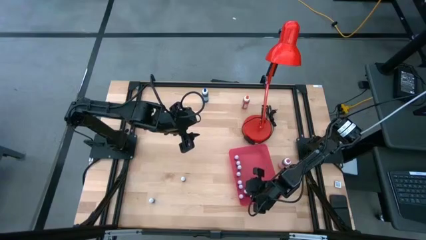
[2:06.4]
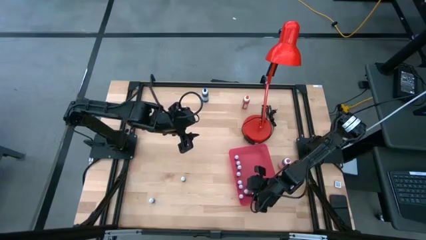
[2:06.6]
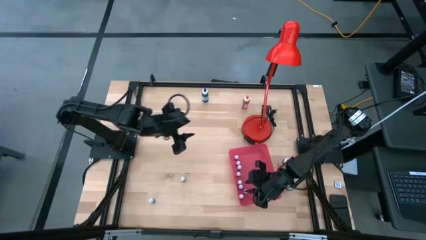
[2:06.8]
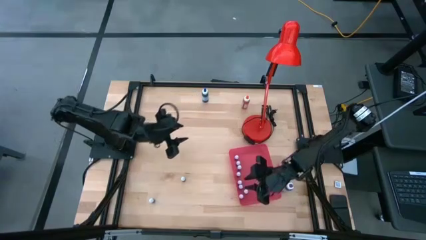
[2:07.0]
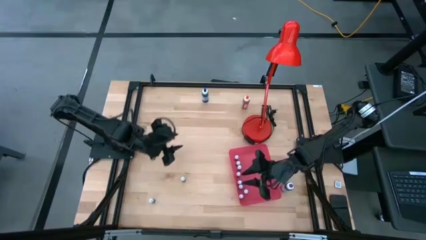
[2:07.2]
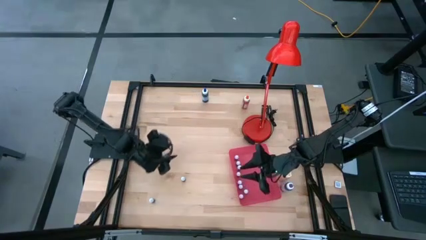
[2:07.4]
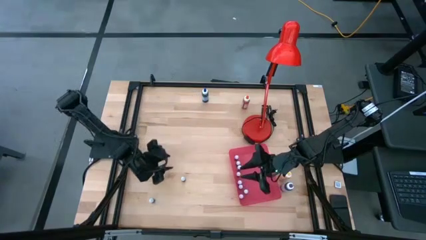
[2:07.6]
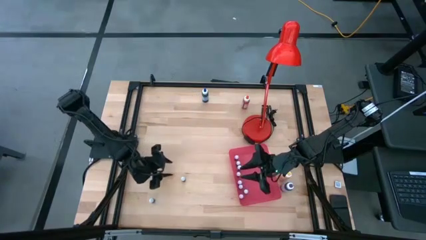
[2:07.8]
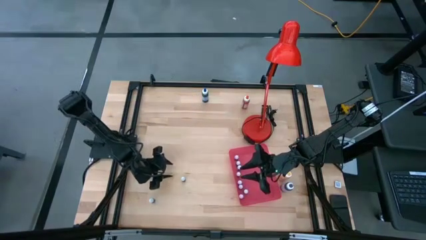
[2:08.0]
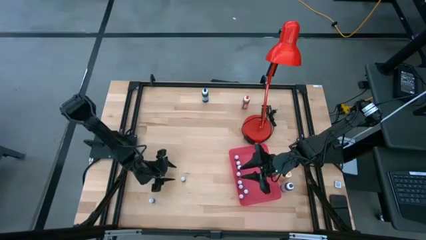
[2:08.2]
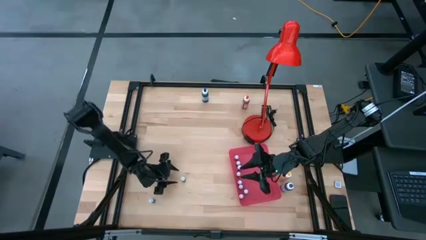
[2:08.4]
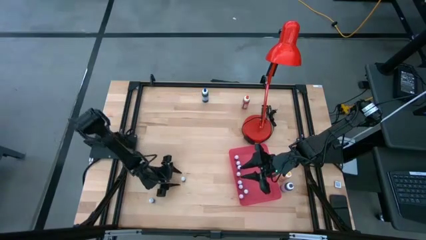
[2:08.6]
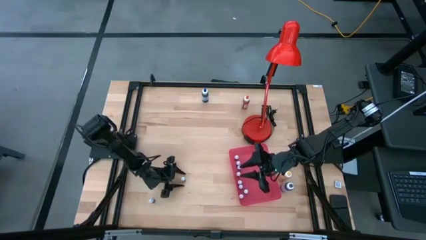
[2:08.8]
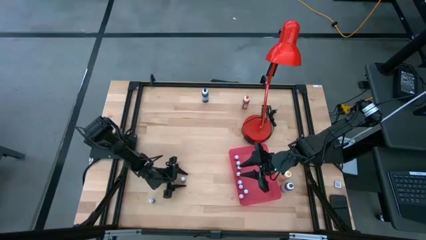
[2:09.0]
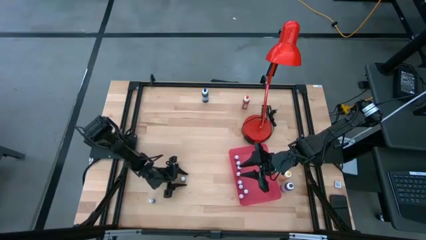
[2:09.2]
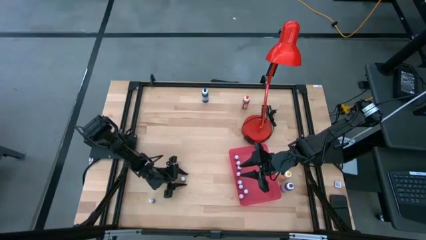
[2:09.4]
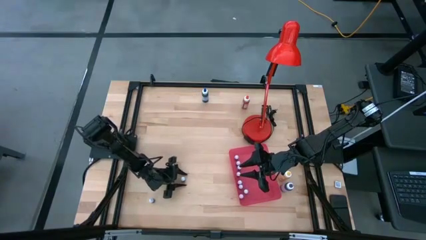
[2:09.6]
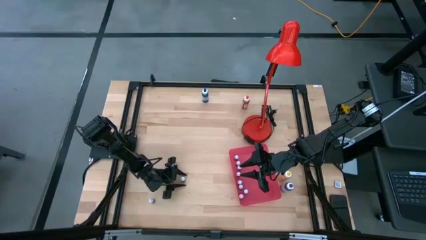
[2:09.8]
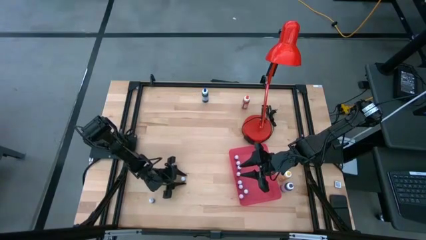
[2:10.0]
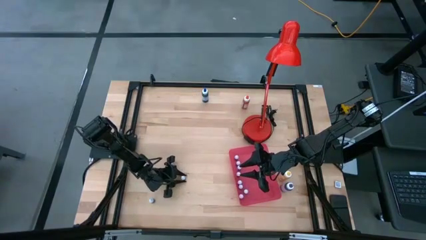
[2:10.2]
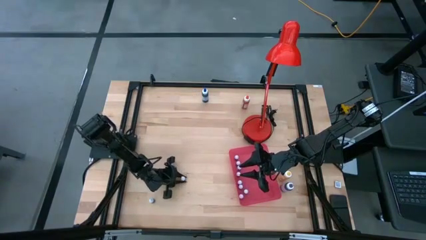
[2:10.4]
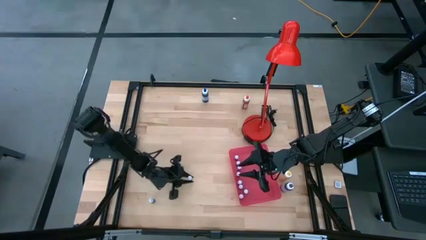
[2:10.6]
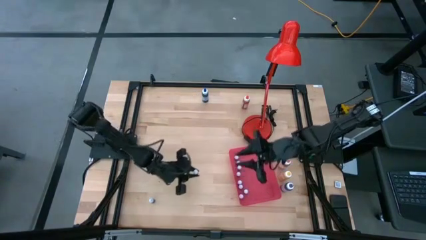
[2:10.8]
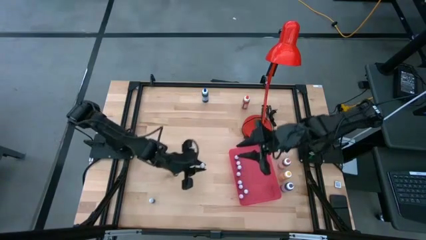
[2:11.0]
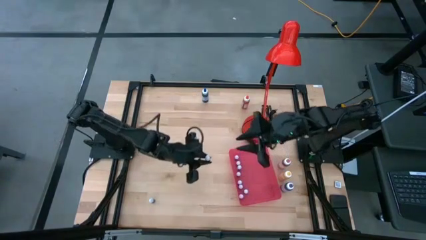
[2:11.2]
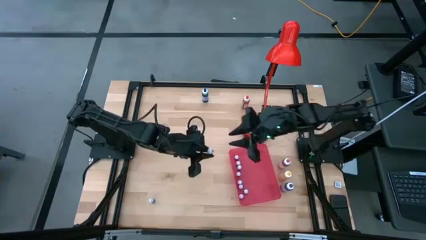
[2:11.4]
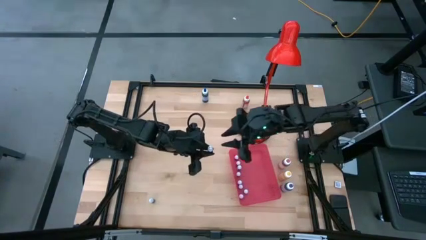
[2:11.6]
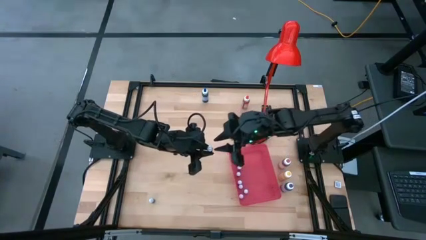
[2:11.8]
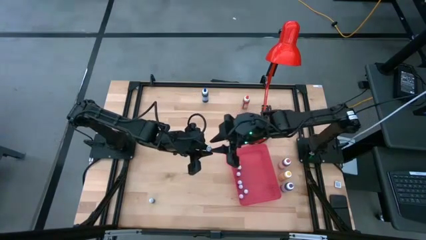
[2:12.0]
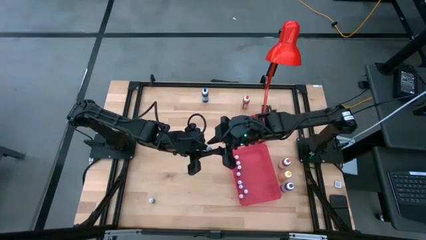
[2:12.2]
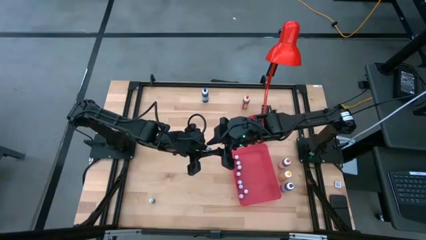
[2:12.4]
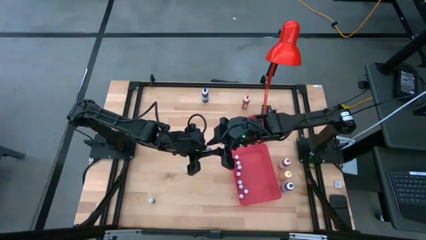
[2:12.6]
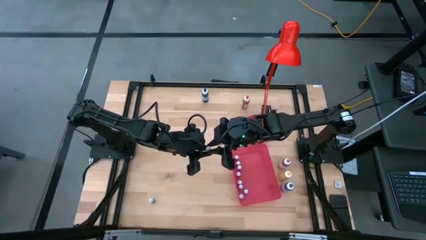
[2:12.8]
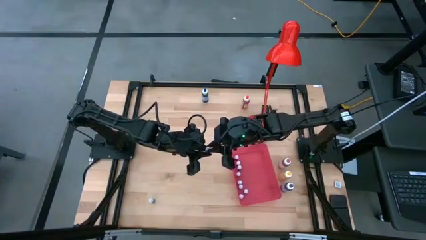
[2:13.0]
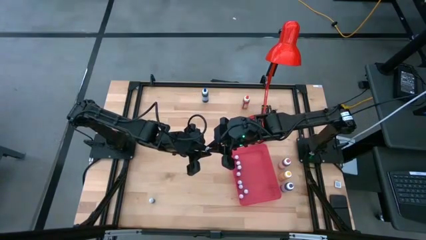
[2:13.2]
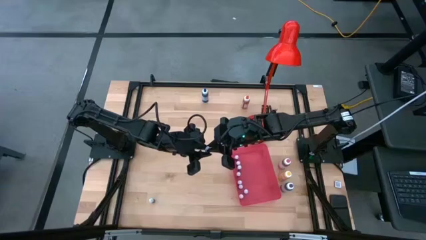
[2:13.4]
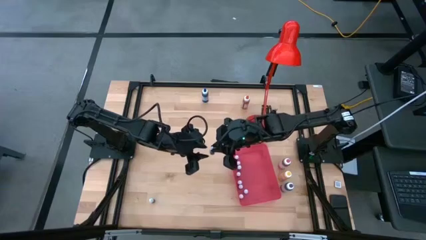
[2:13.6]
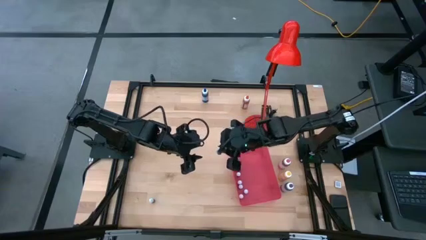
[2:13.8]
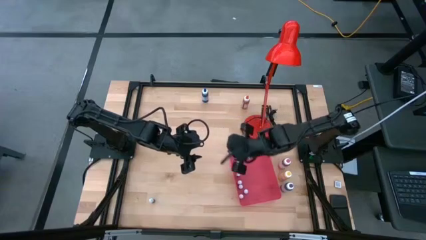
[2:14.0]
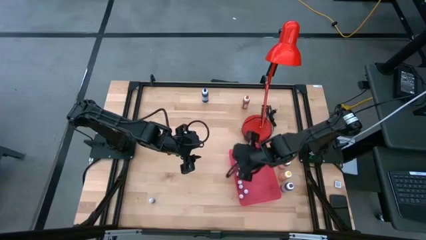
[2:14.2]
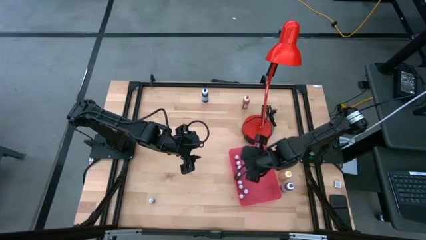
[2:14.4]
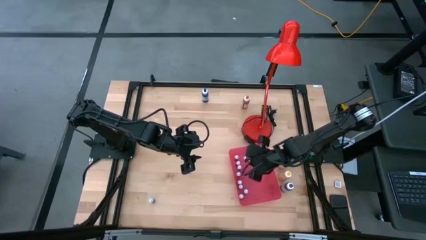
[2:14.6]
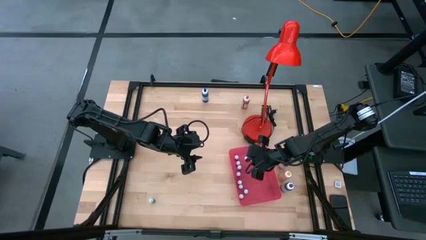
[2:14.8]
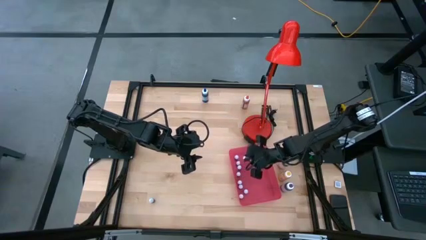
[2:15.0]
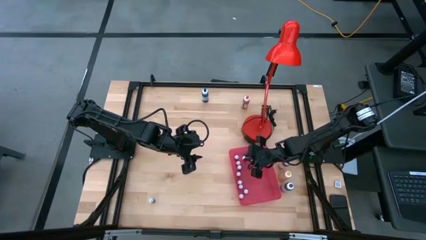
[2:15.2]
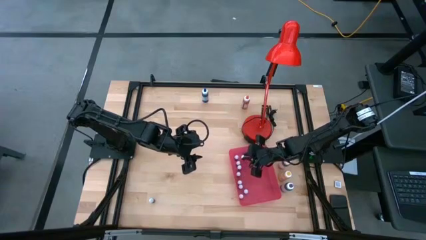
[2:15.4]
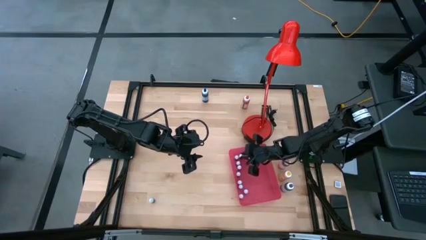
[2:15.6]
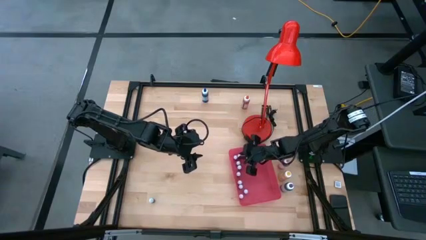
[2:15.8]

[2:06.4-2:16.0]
Task: Pick & Place food coloring
Put the small orange food coloring bottle into the red bin

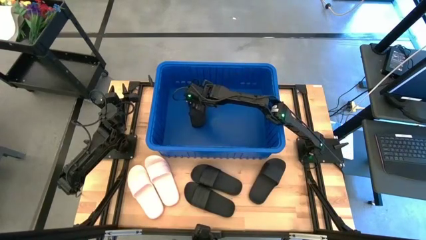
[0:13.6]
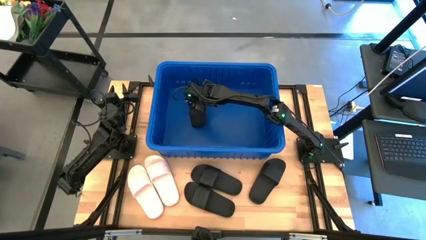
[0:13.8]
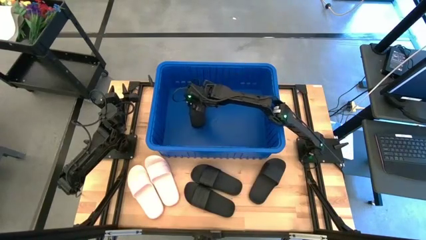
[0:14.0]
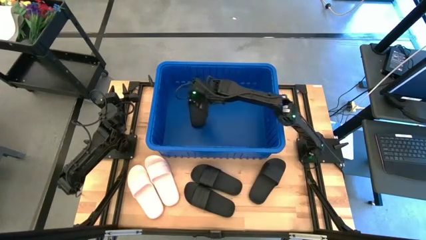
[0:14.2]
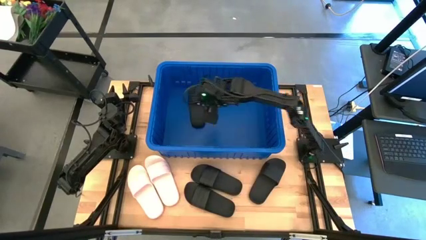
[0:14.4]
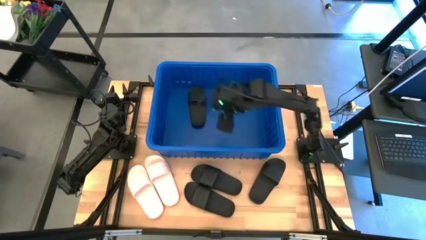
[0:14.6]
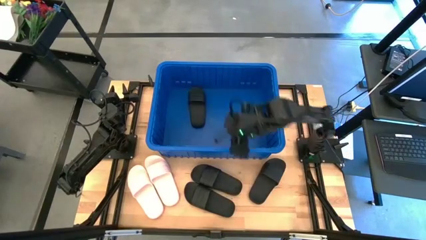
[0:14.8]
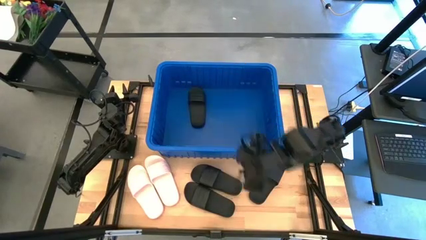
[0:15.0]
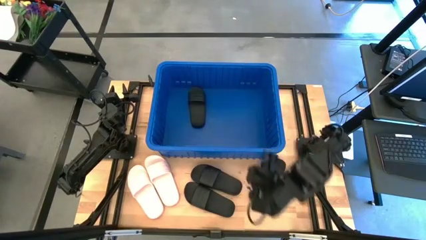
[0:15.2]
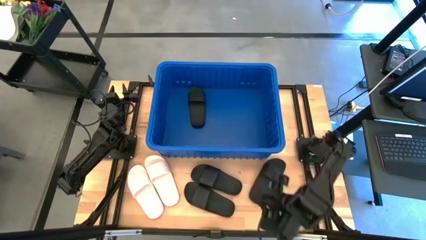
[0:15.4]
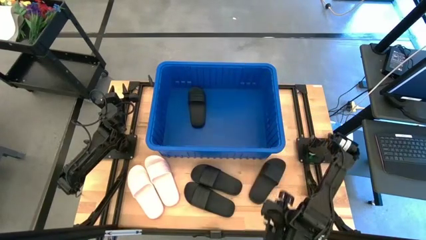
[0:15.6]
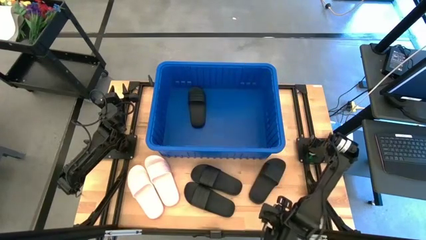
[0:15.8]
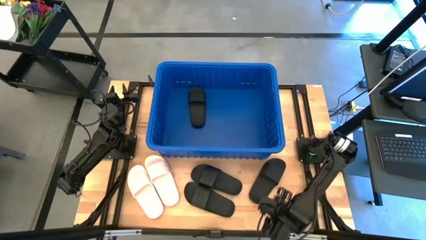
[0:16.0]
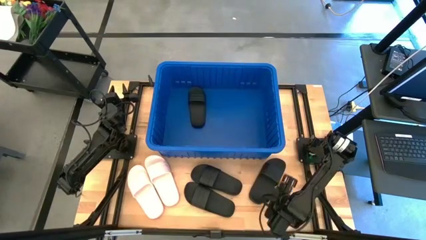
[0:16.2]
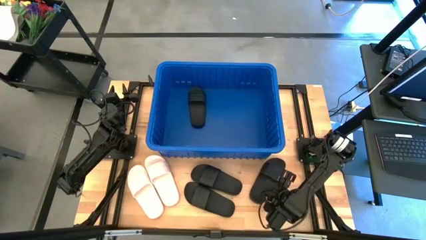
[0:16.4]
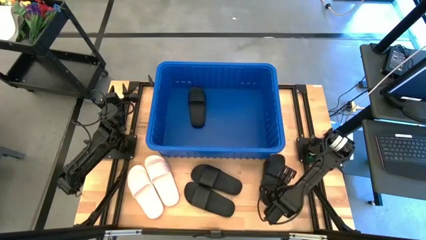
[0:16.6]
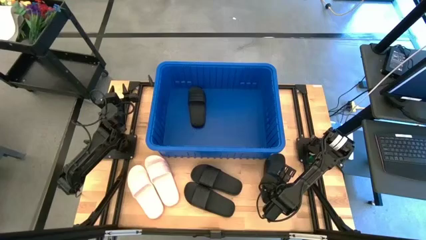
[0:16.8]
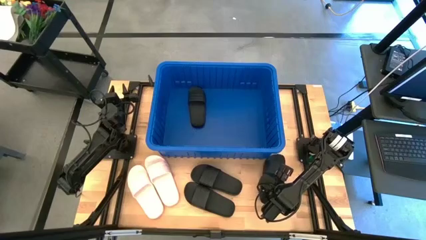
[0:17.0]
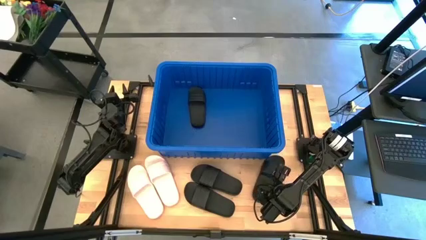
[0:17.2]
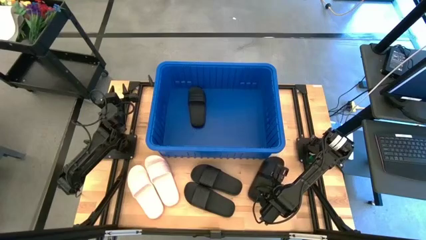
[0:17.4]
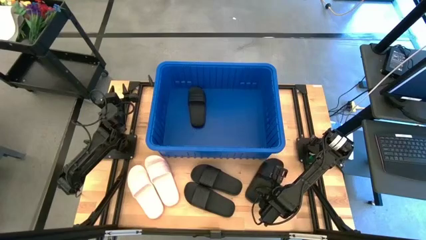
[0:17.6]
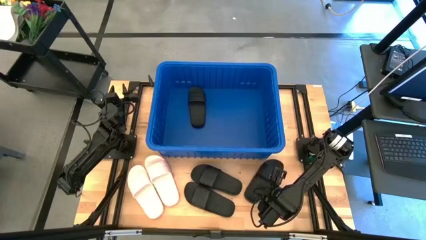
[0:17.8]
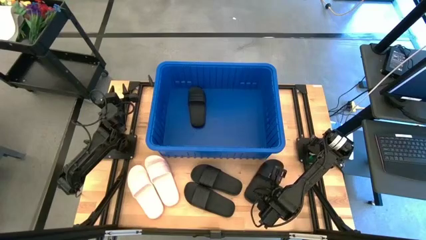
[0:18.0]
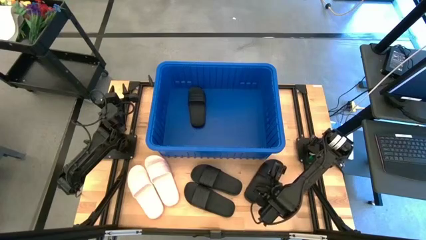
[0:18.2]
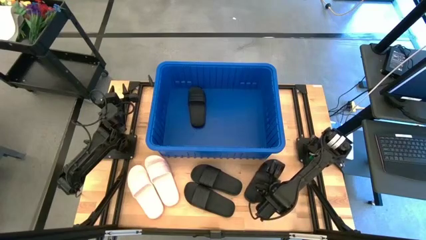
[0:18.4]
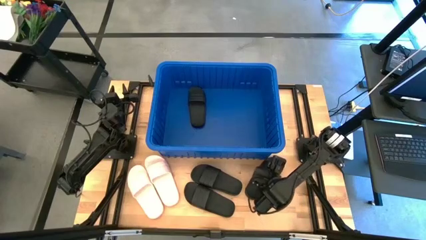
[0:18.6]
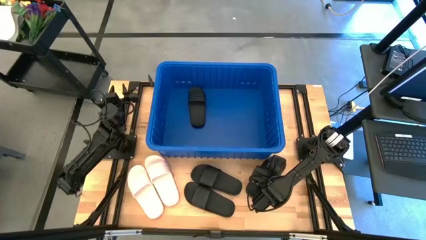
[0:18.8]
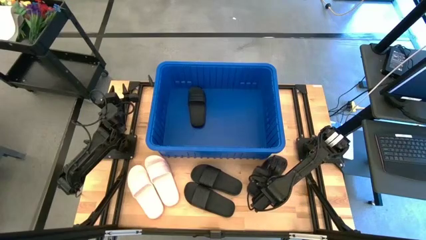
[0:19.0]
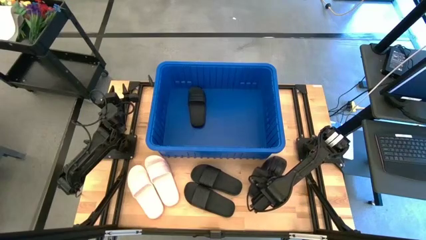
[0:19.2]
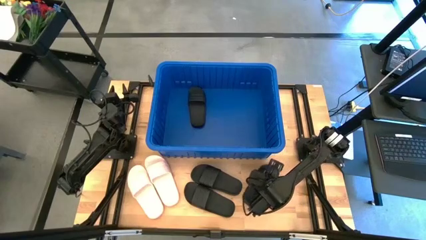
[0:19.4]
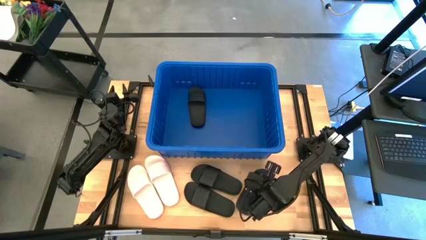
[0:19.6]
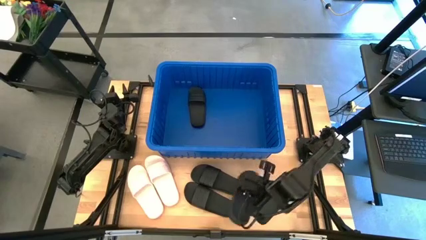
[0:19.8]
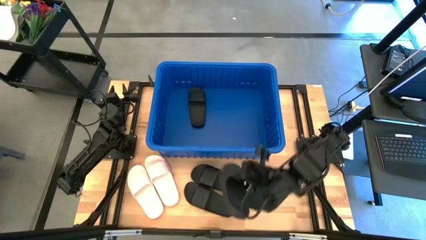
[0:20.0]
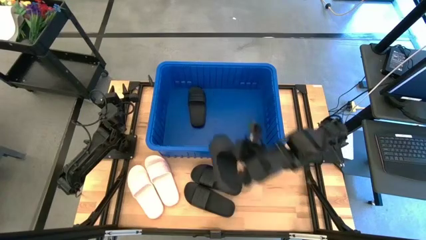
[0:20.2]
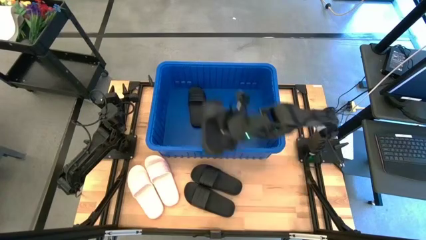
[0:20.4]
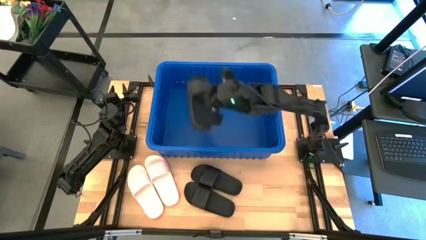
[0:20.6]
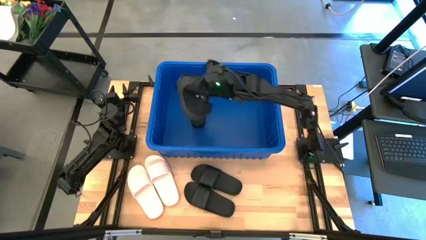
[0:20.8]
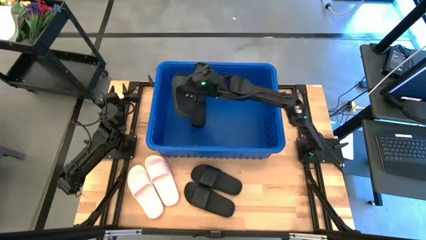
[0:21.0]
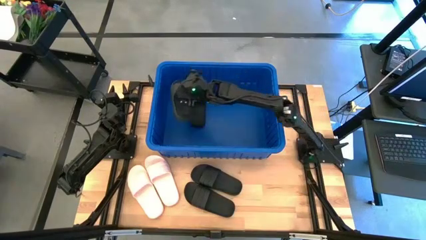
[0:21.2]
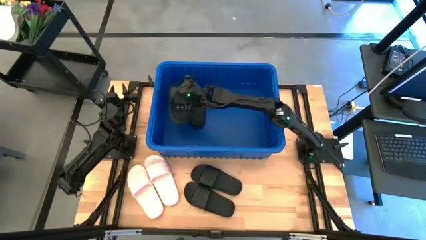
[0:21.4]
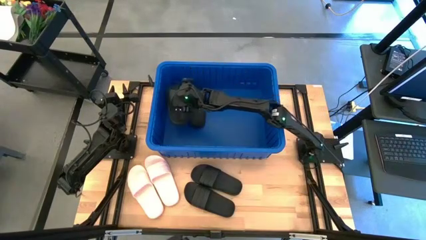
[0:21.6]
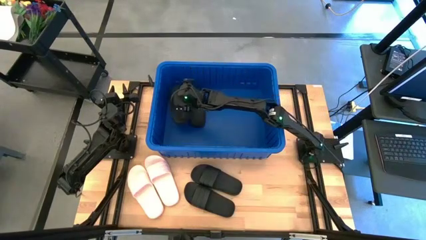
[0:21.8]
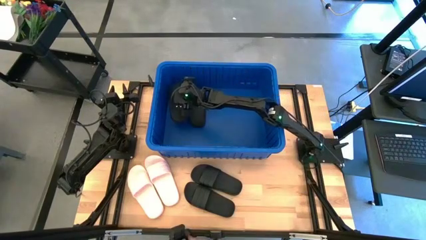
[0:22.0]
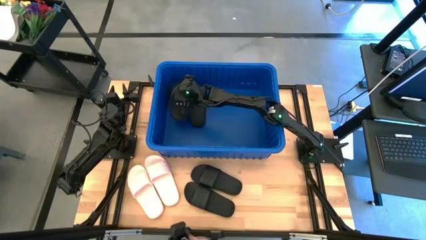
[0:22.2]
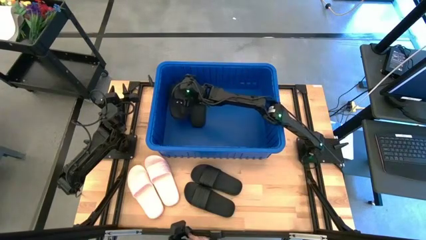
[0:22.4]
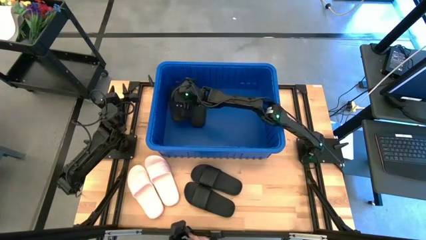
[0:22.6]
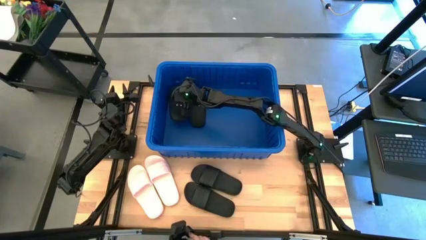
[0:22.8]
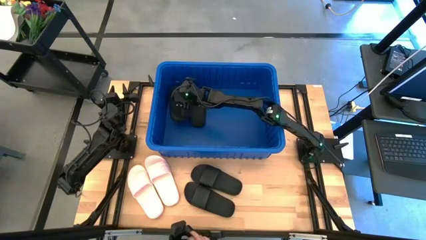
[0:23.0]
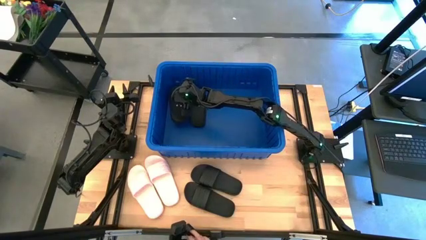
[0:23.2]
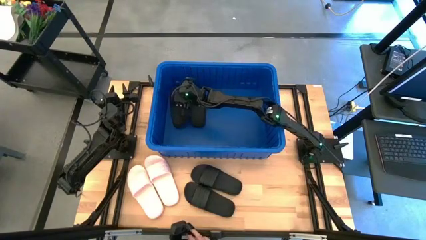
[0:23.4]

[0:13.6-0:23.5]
Task: Pick and place slides into bin
Put the black slide into the blue bin
